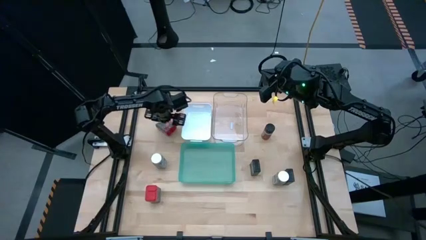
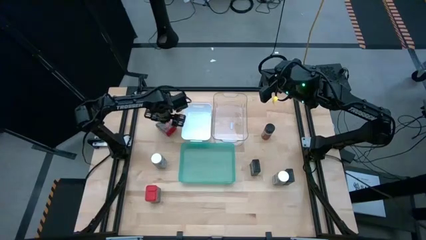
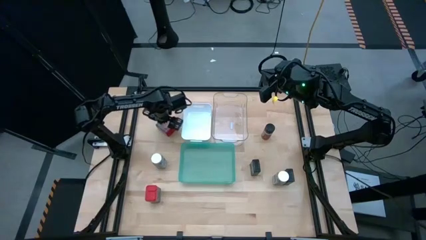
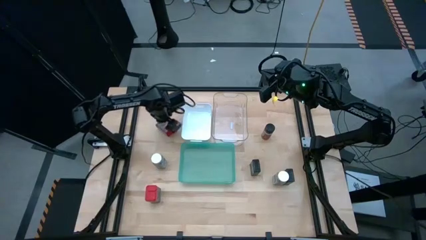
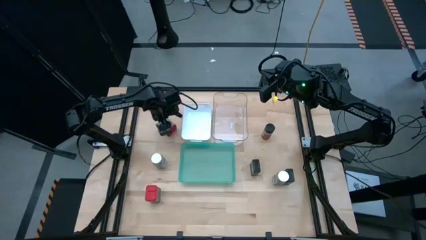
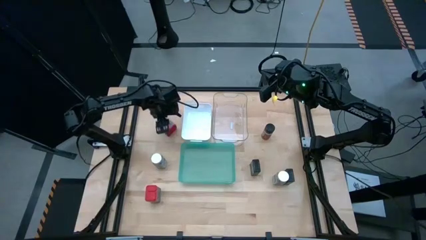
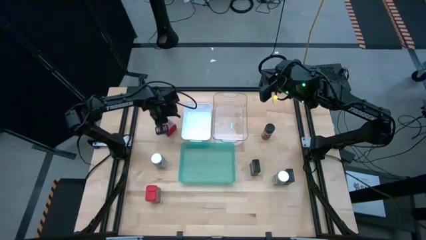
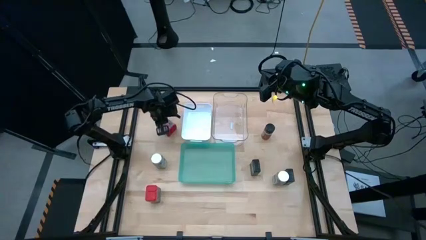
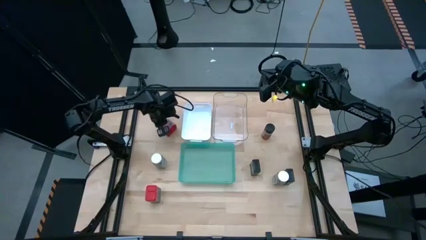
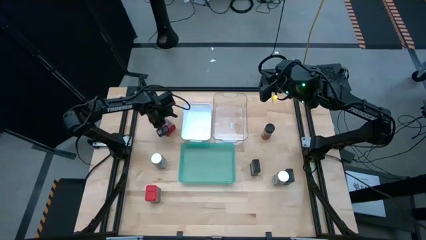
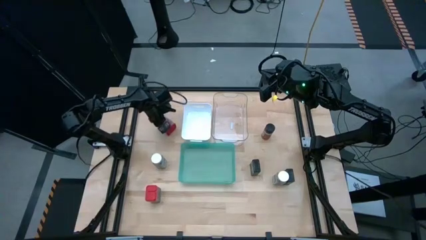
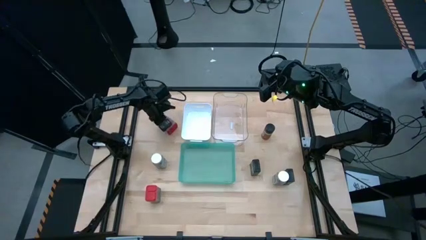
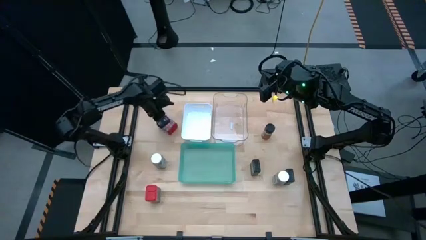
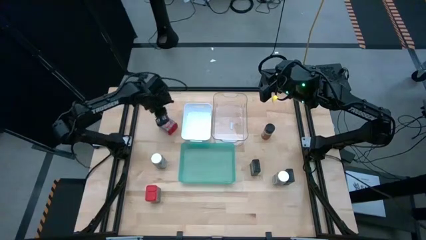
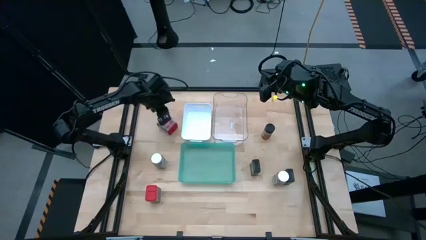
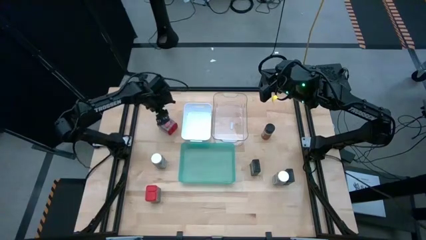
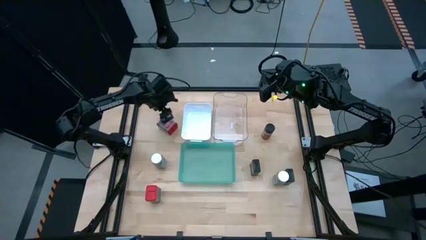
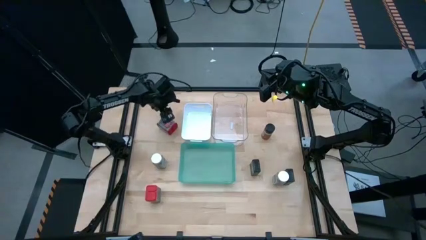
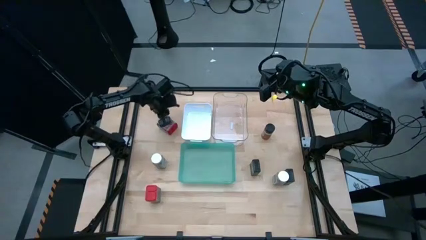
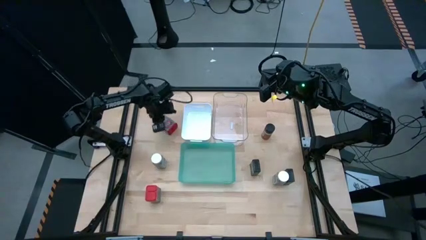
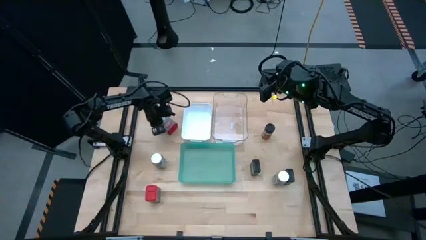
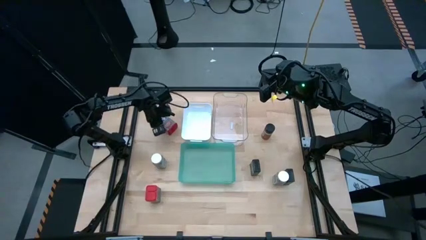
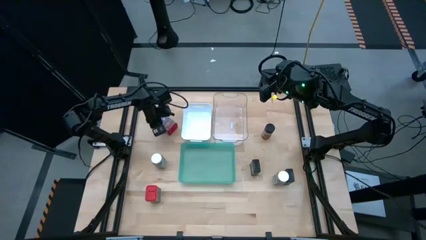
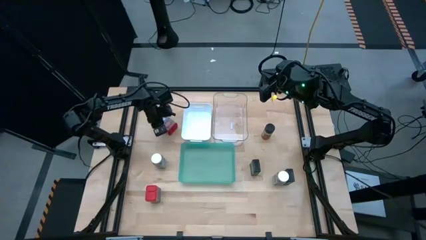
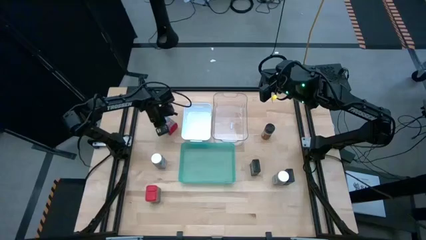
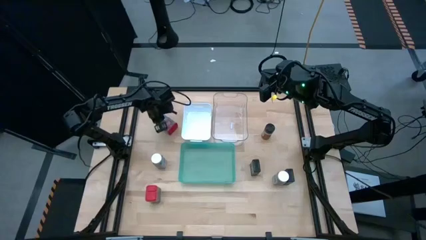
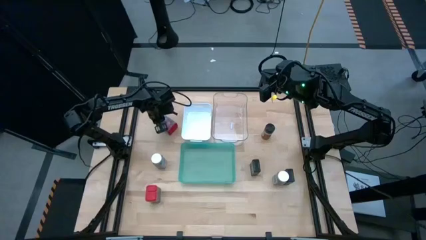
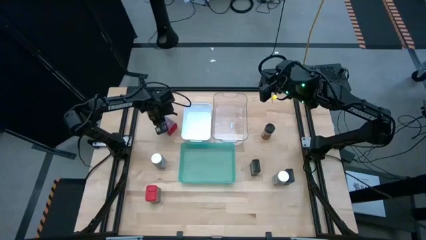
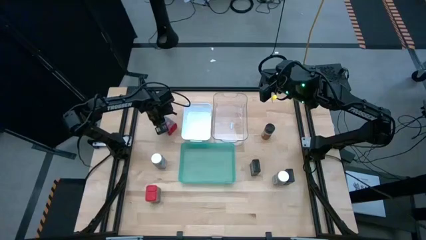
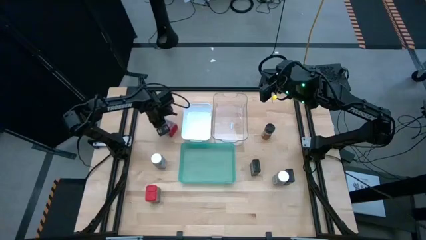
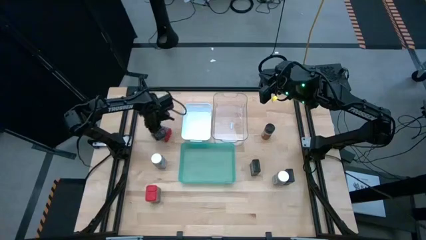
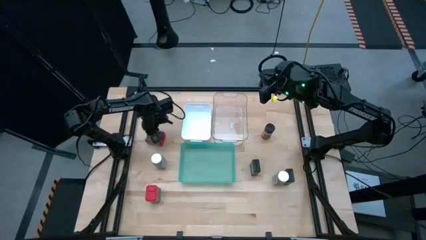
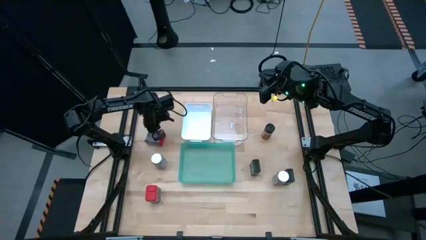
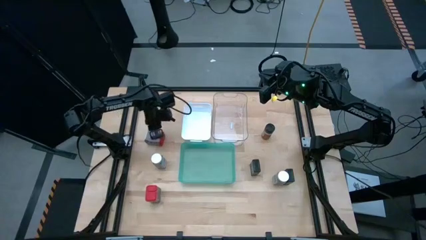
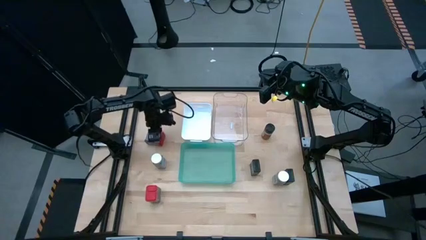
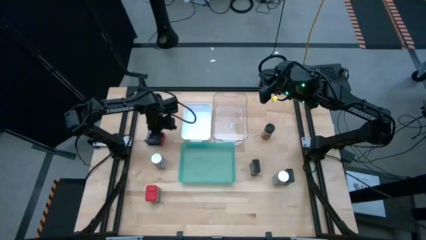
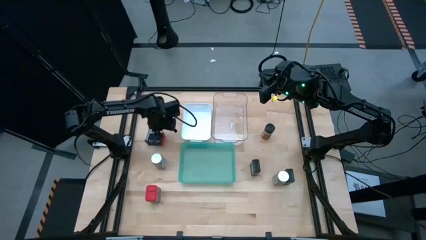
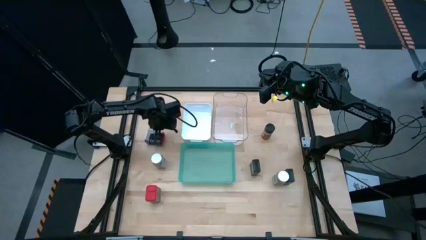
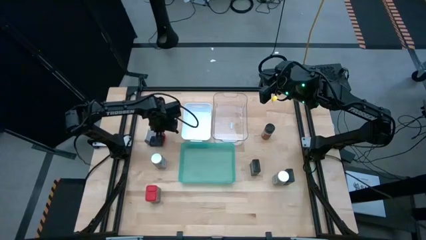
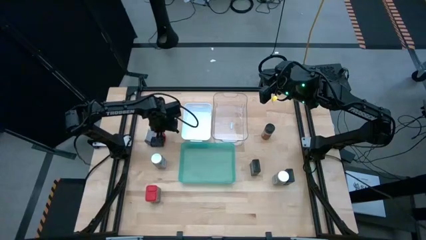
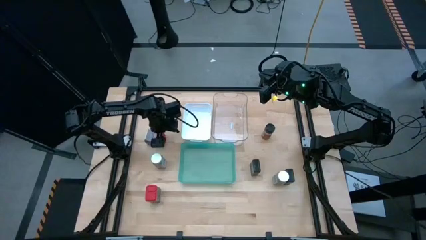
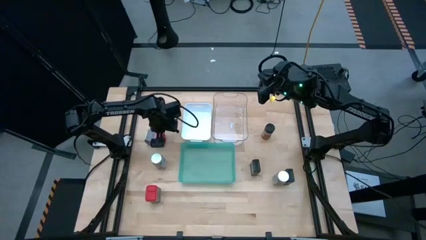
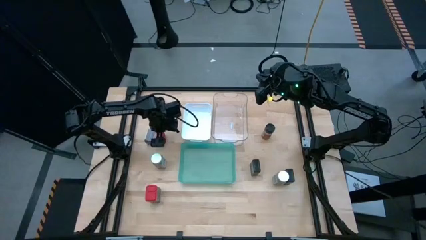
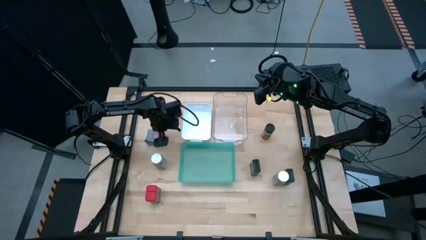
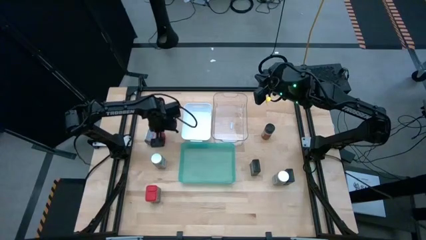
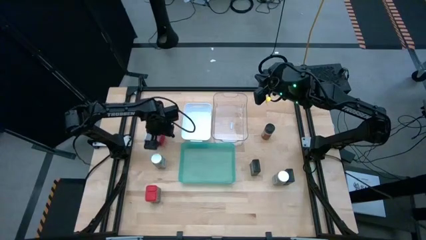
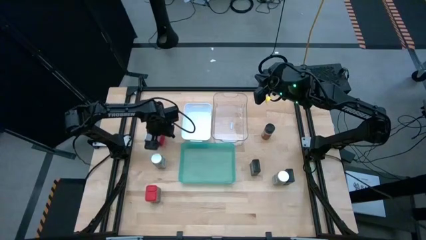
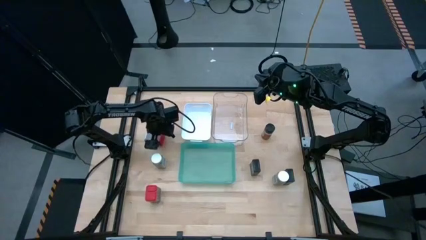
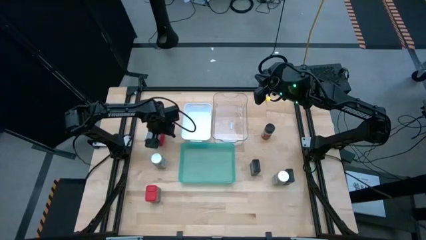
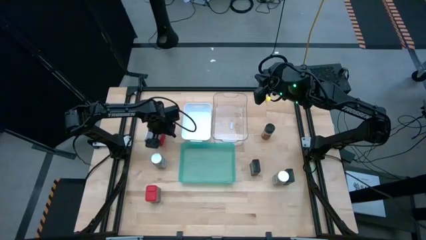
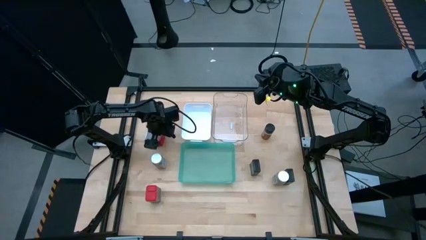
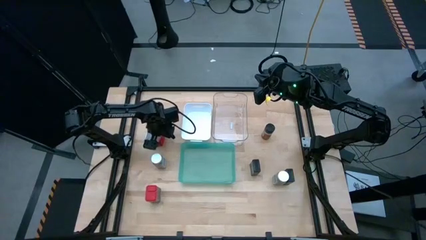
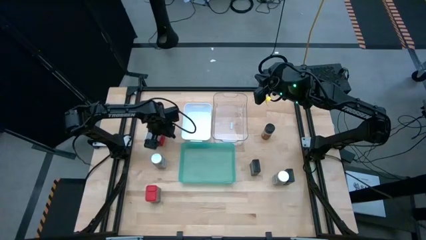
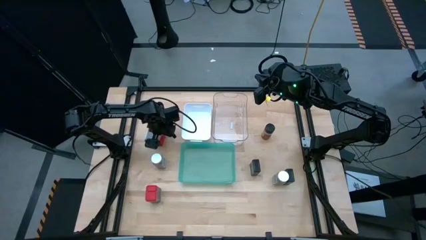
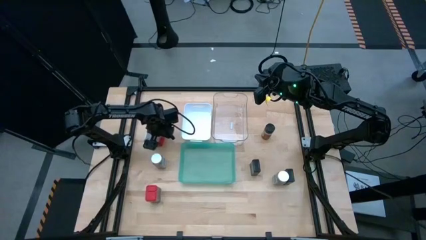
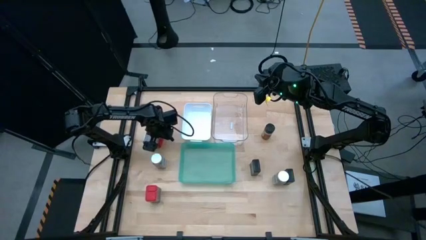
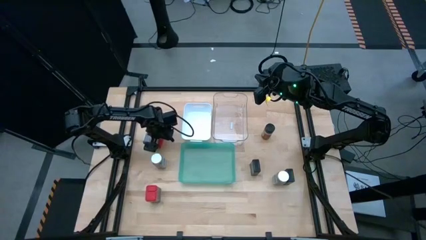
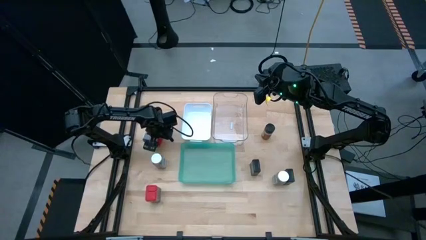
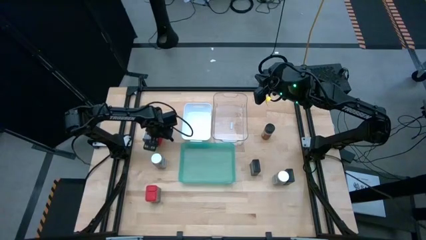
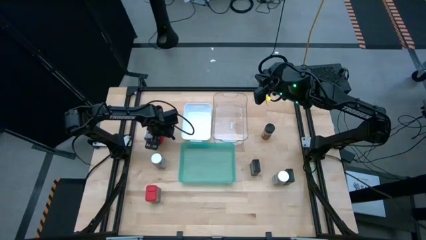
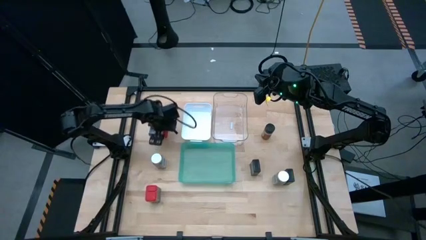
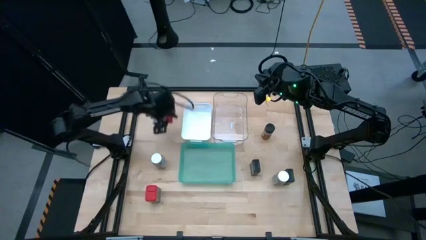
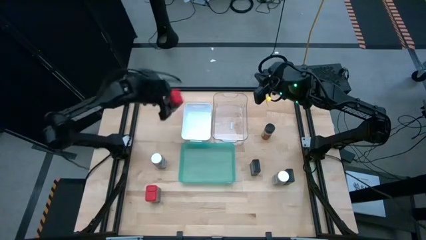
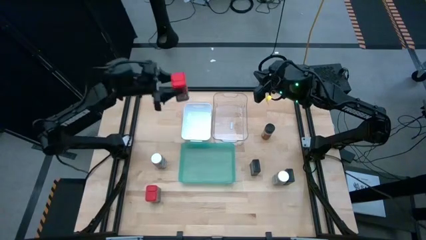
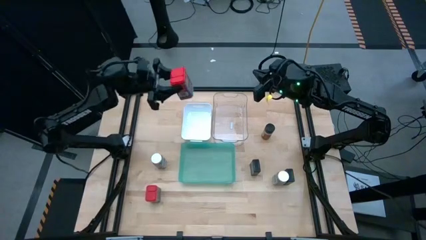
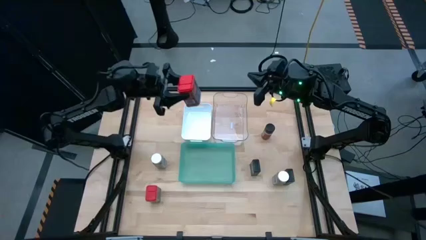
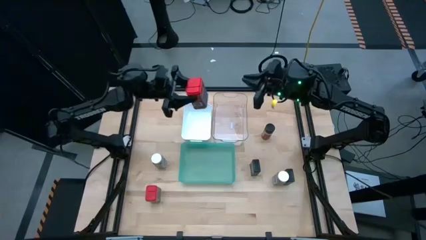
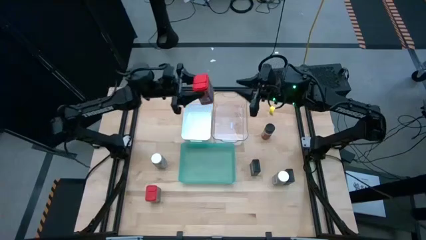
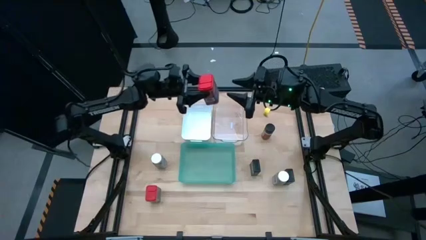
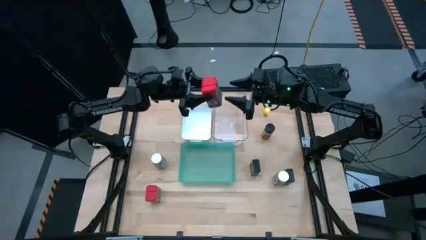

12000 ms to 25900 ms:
Task: Sort spices by type
Put the top red spice can into the green bin

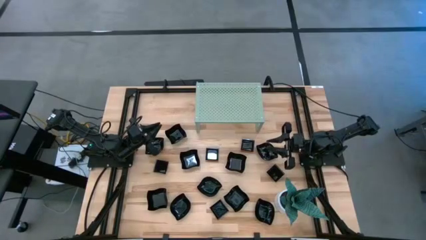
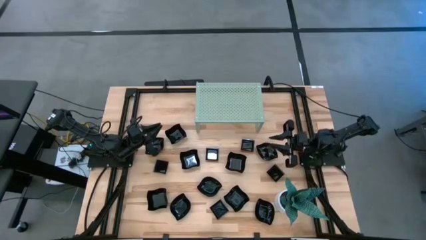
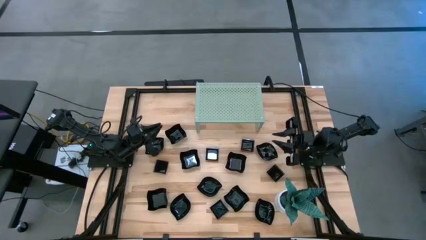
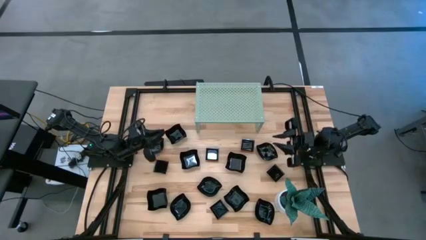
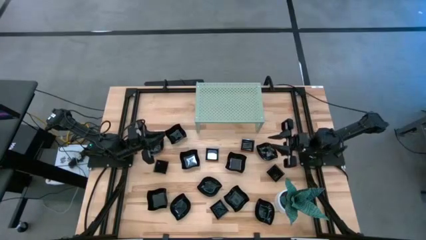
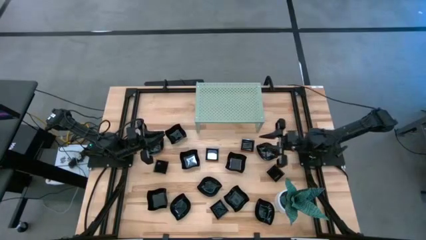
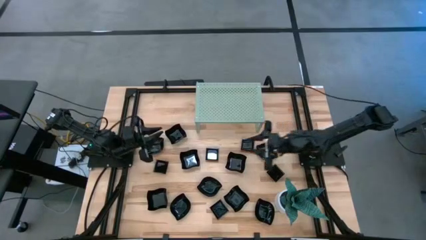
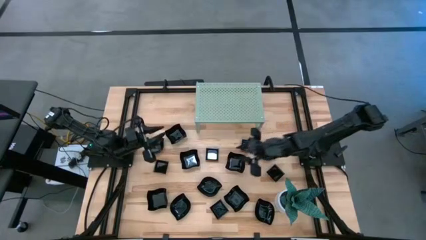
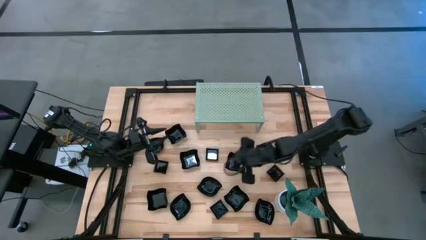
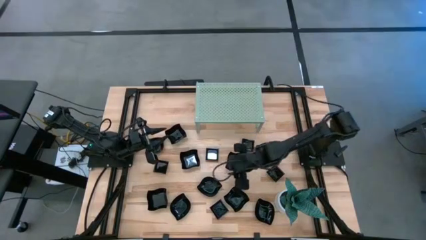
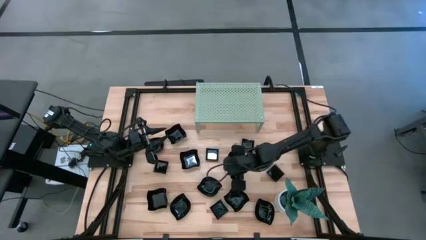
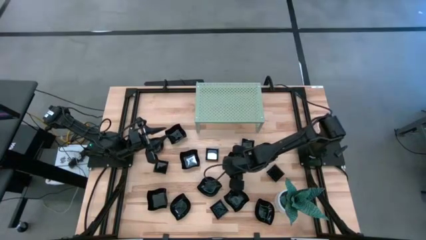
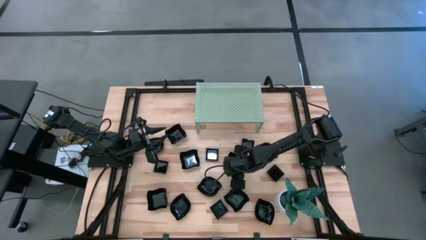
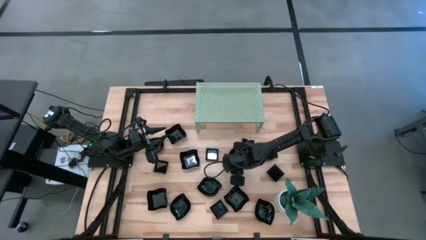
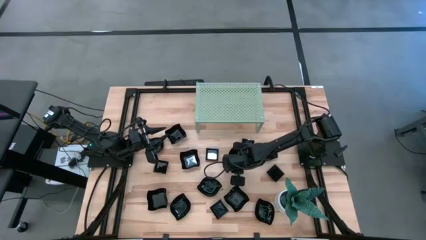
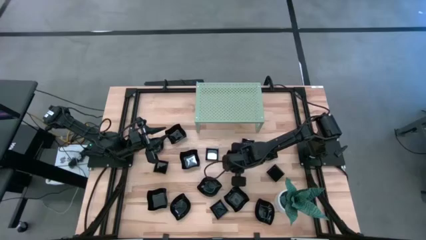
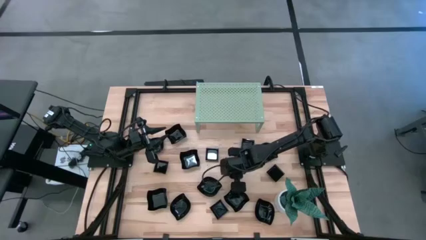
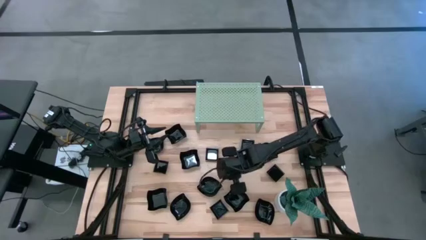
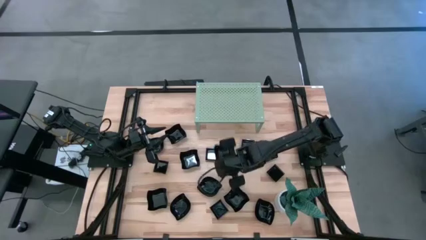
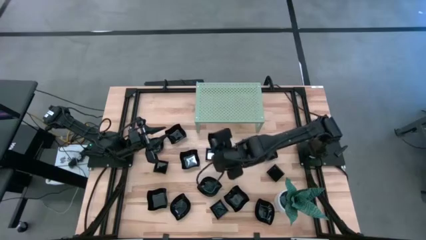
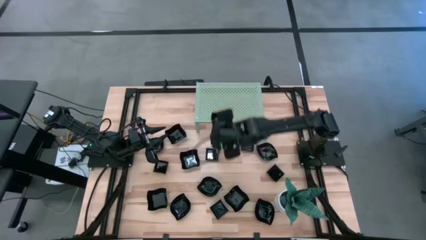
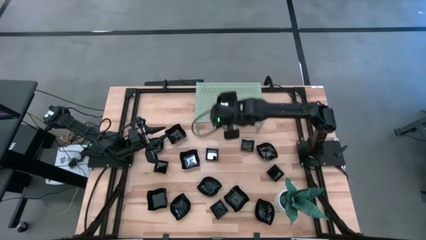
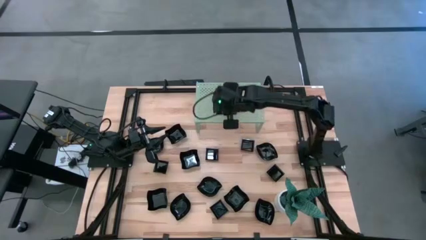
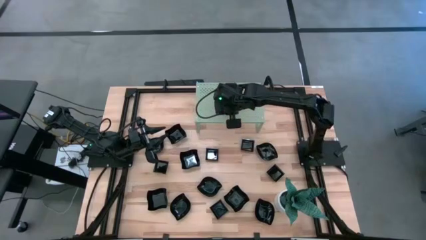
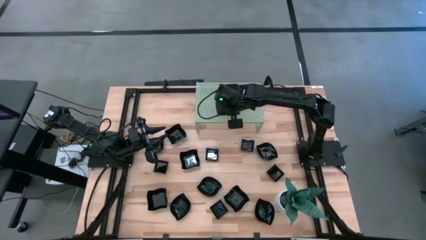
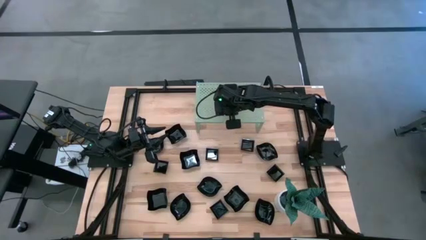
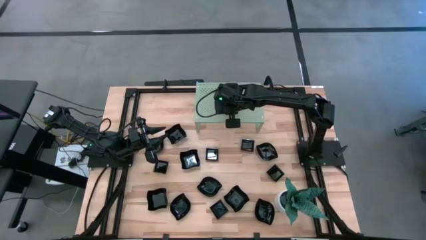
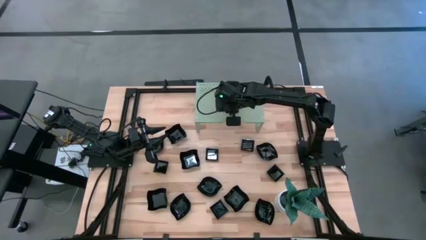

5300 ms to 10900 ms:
Task: Pick & Place Mini shaped plates
Put the distorted square plate on the shelf
